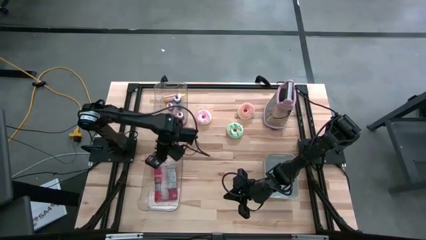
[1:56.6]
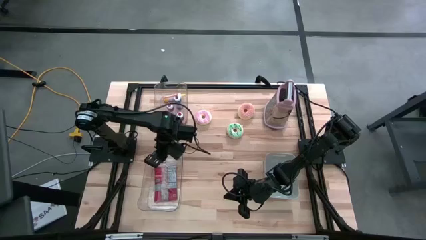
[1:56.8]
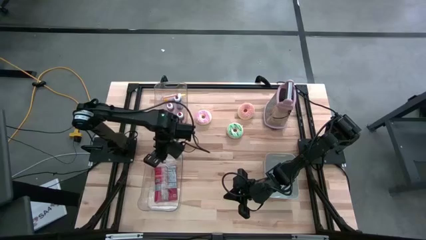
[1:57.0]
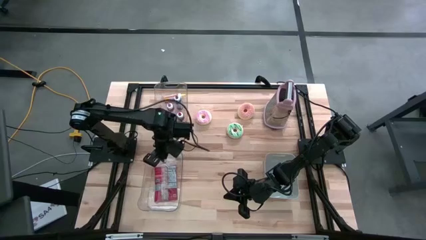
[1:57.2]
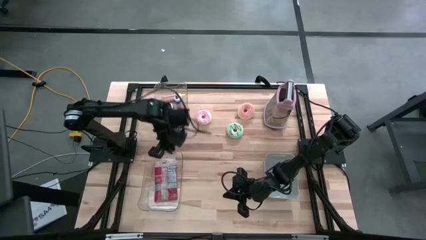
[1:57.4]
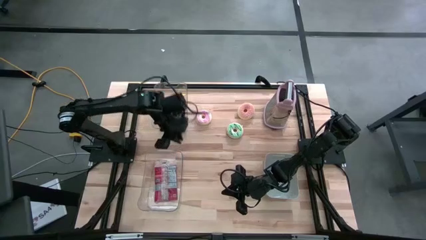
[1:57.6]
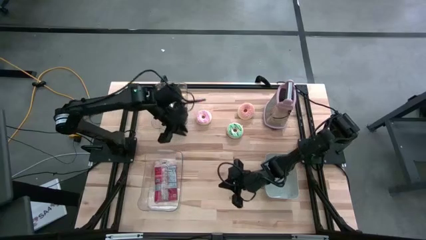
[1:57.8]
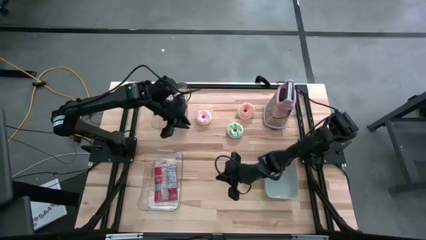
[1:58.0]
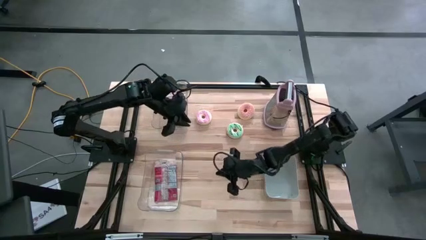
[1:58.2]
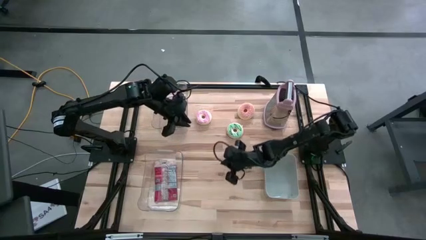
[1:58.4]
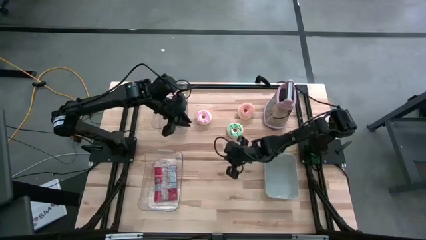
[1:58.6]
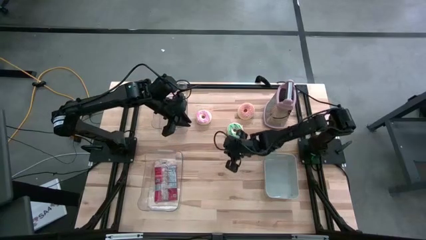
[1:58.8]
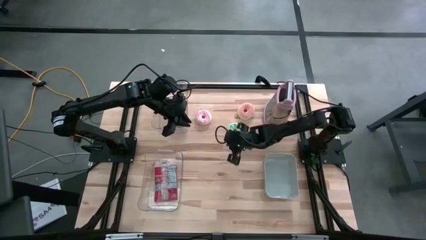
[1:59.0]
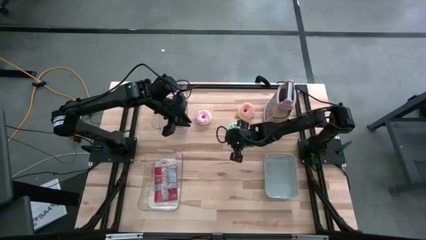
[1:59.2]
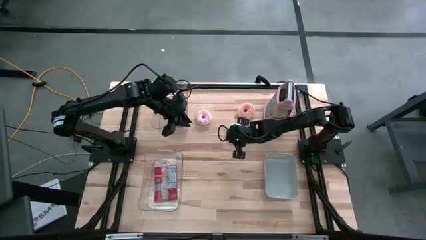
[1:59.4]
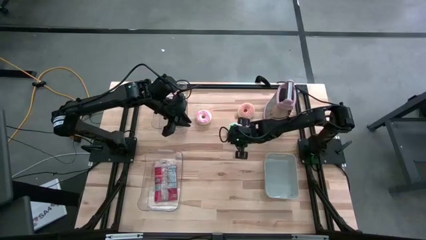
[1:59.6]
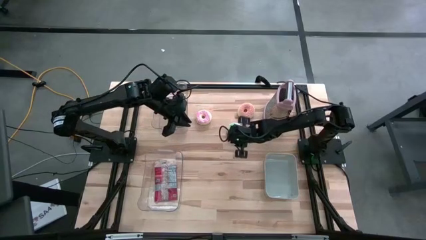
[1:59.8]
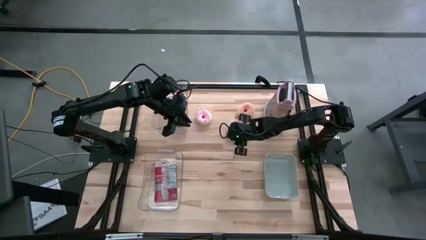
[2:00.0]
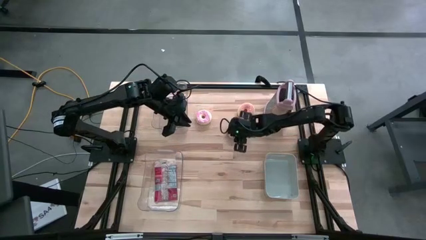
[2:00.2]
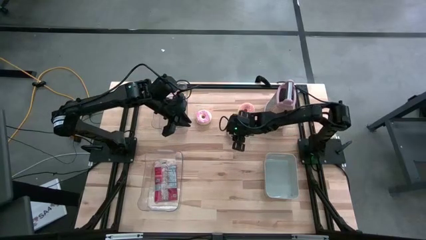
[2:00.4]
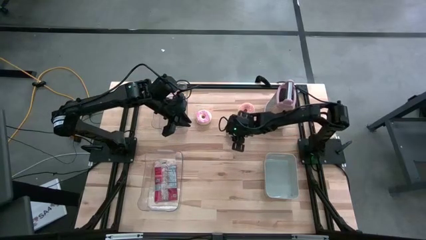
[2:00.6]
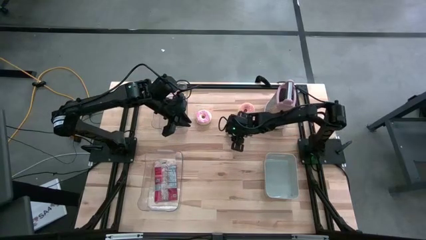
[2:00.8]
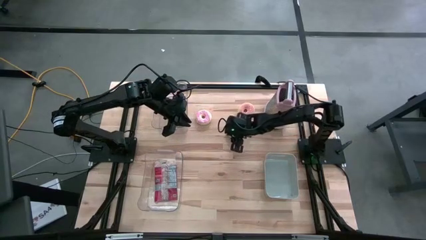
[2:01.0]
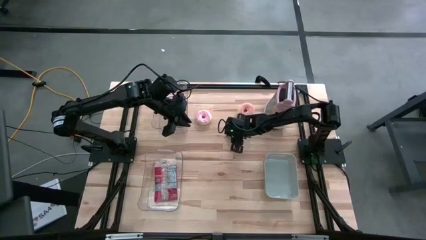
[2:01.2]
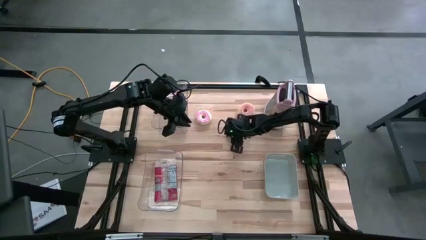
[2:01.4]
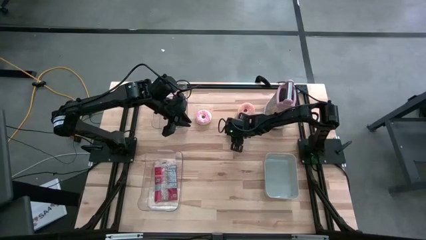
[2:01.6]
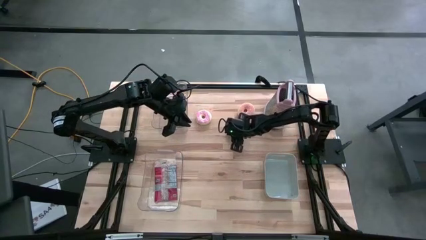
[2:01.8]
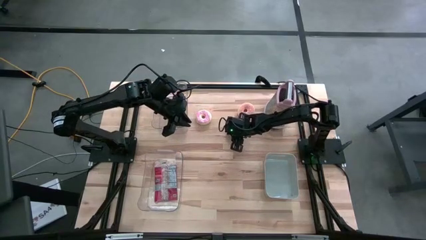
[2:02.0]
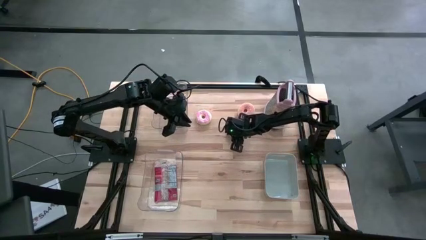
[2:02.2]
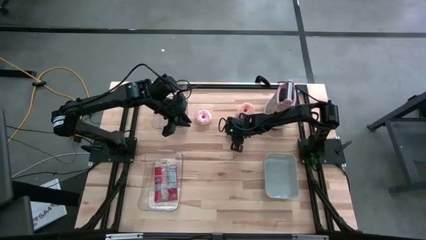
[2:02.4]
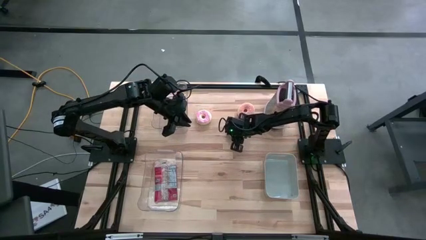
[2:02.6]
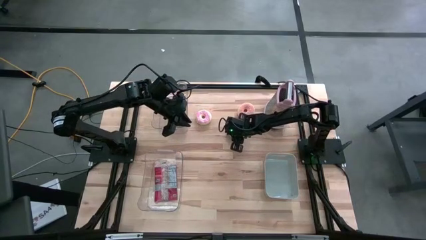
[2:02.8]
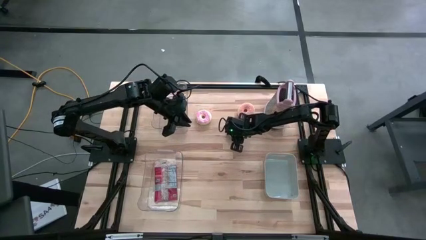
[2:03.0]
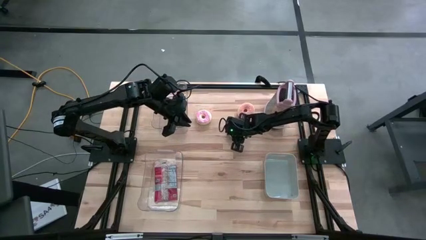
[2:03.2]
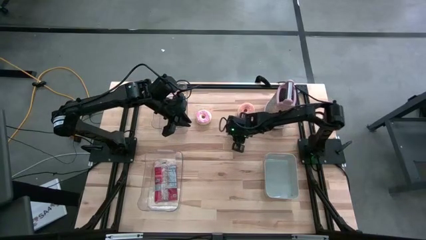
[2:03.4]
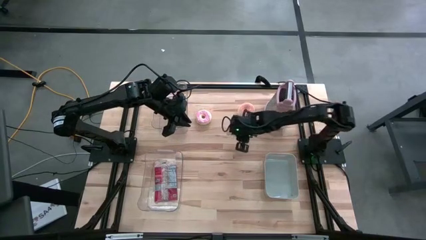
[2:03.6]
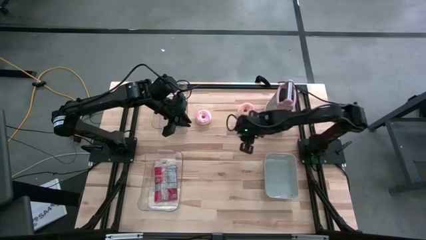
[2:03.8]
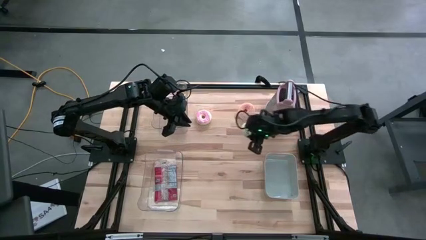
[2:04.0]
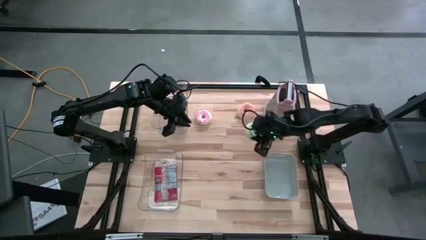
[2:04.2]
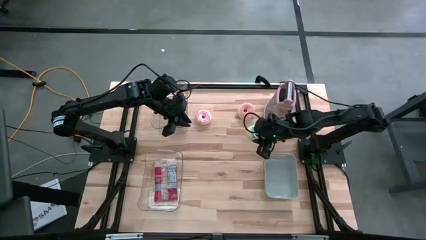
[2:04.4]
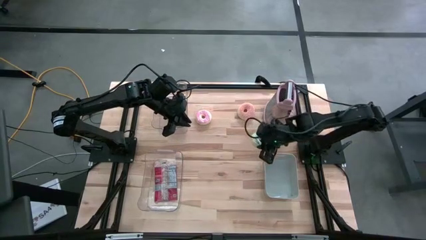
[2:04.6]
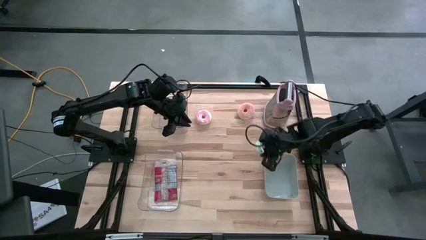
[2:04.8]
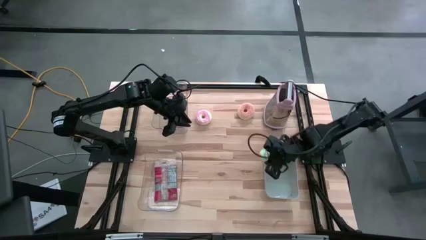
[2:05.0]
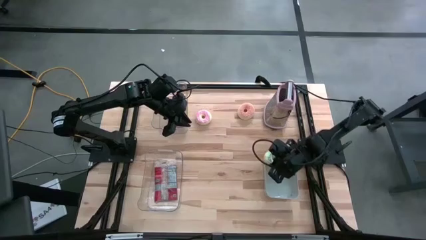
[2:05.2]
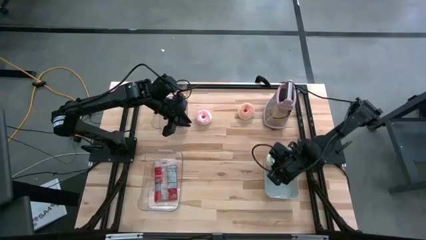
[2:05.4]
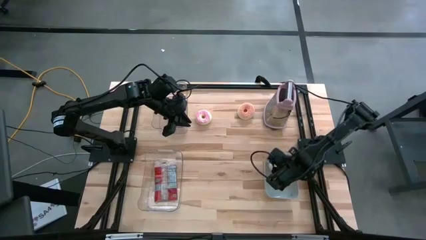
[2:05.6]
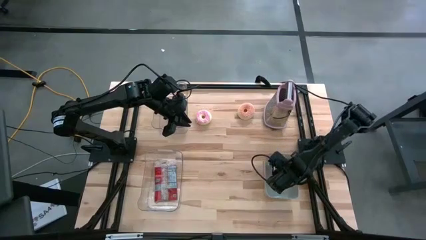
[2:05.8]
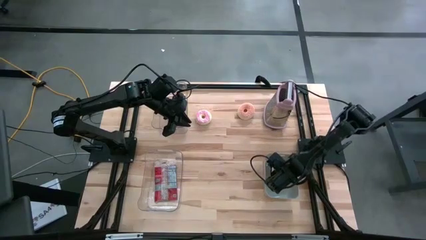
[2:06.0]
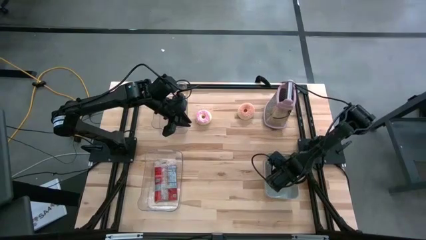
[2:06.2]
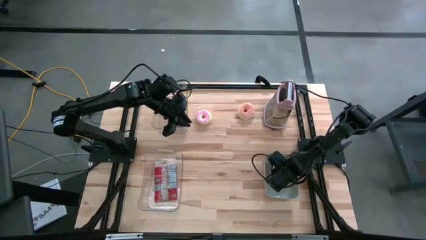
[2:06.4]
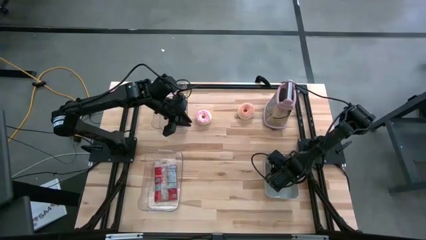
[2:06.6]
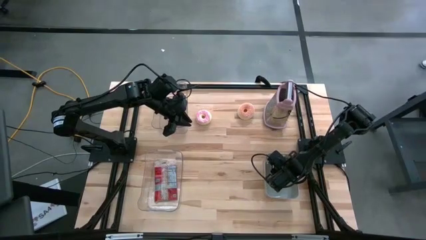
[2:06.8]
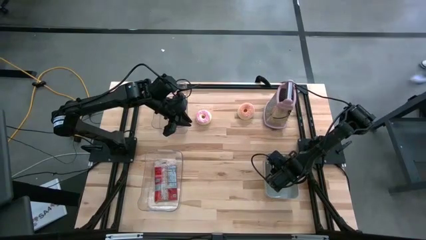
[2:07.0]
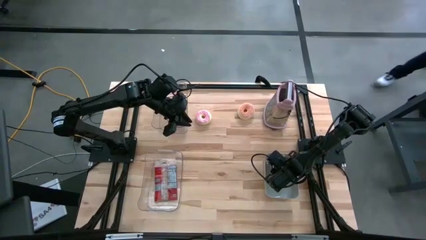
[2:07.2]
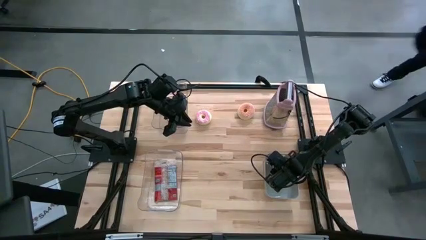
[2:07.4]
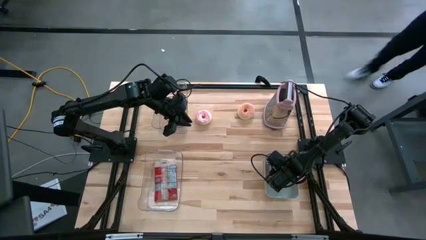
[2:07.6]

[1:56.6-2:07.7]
Put the green donut into the gray bin
